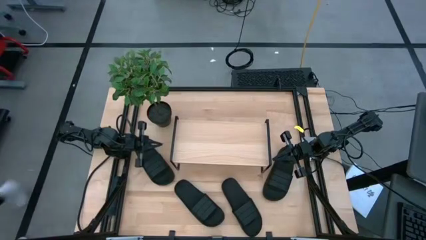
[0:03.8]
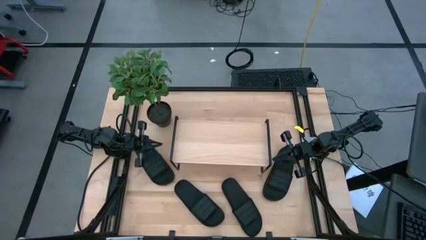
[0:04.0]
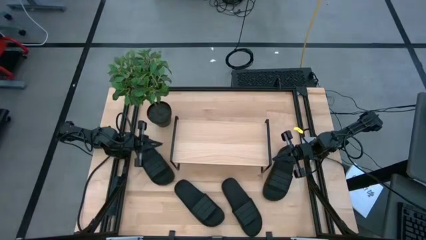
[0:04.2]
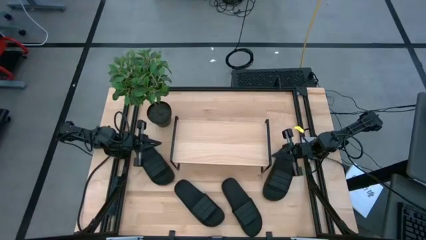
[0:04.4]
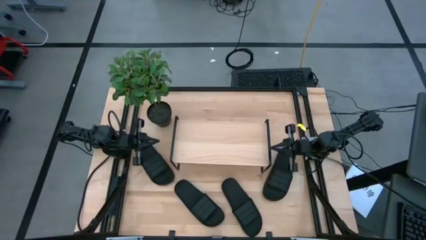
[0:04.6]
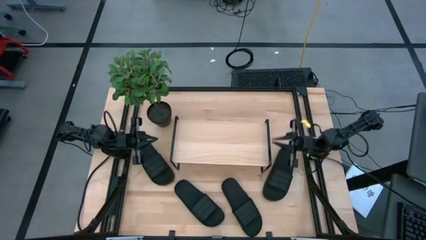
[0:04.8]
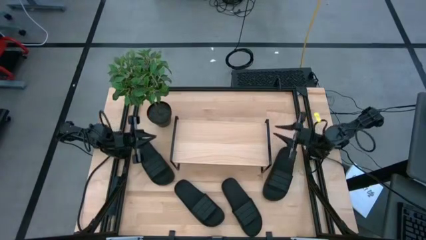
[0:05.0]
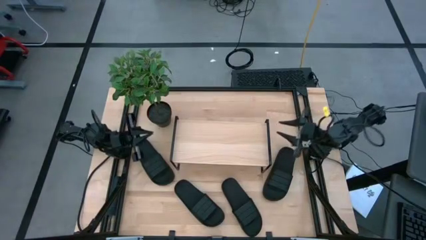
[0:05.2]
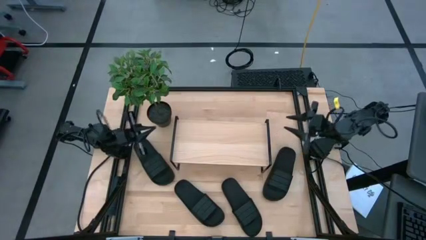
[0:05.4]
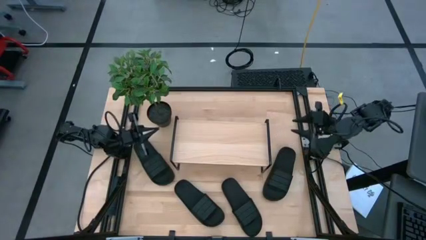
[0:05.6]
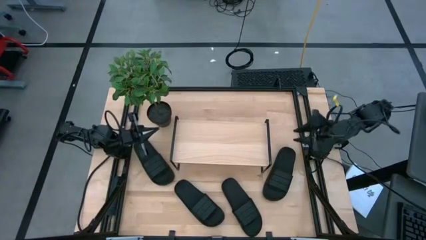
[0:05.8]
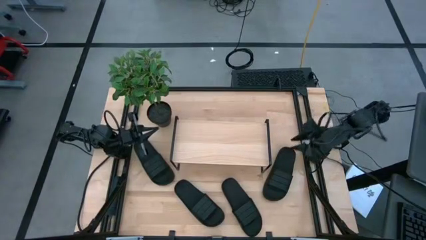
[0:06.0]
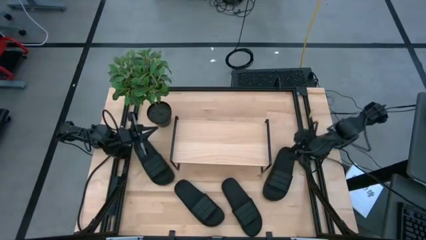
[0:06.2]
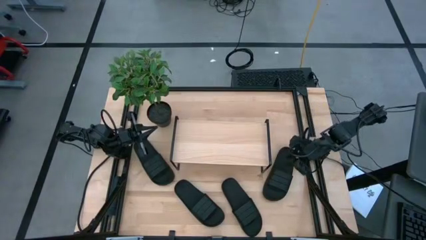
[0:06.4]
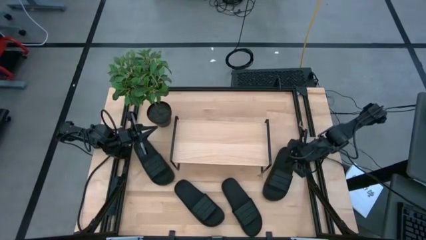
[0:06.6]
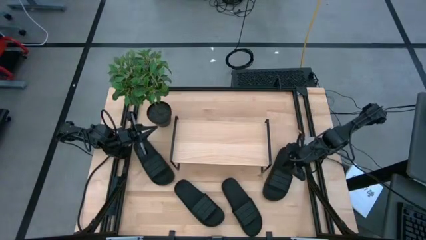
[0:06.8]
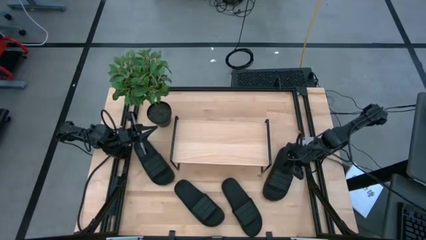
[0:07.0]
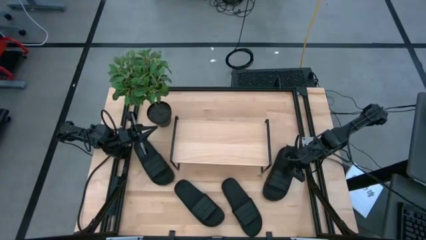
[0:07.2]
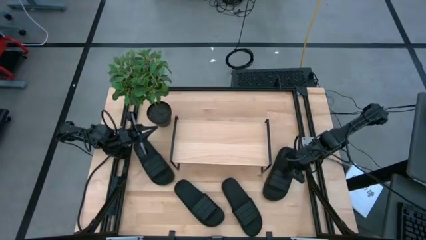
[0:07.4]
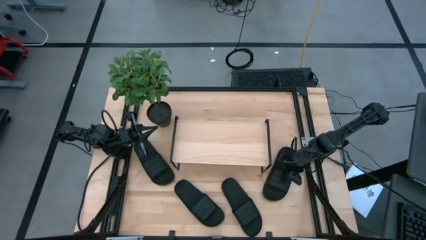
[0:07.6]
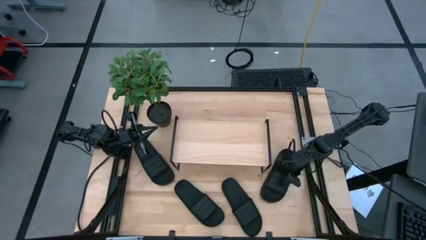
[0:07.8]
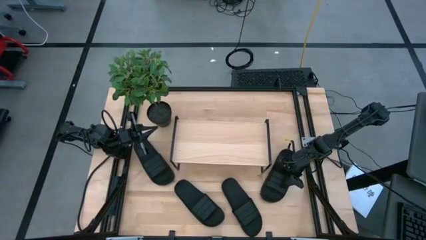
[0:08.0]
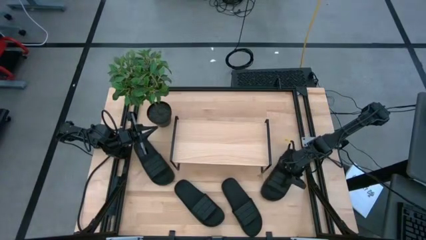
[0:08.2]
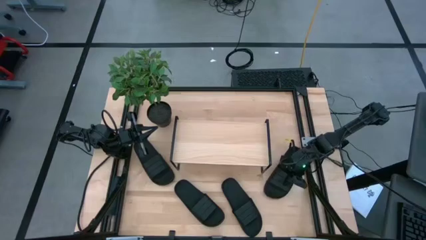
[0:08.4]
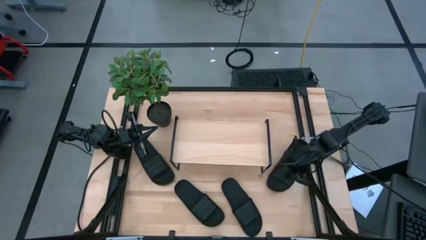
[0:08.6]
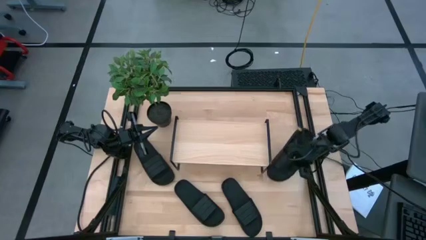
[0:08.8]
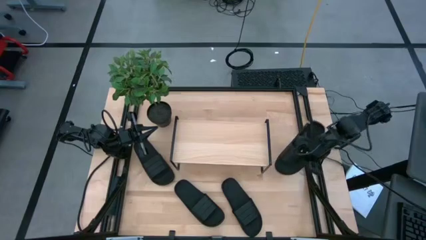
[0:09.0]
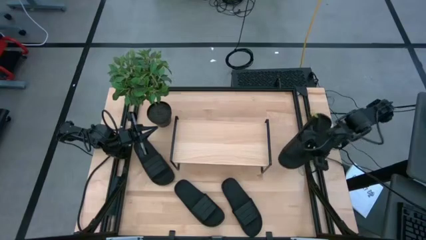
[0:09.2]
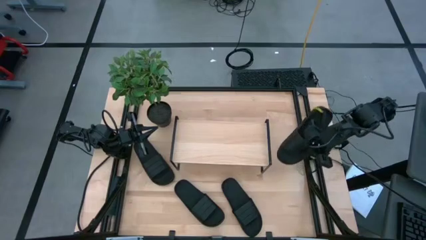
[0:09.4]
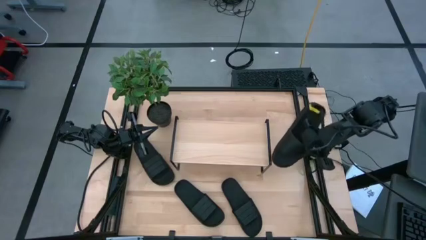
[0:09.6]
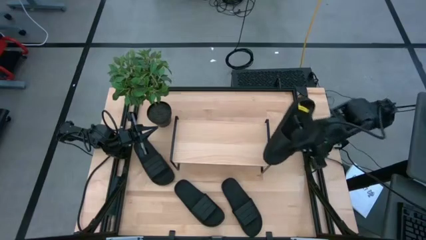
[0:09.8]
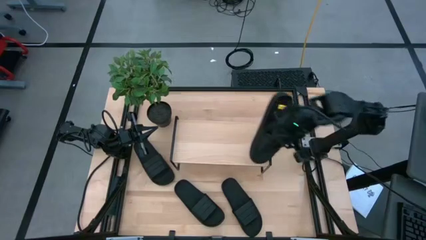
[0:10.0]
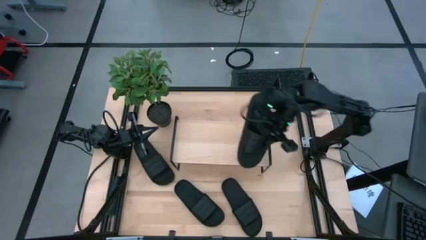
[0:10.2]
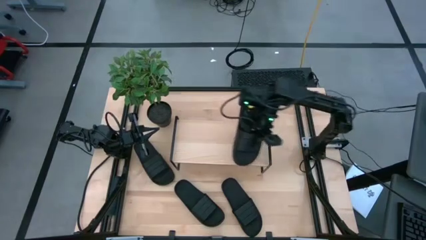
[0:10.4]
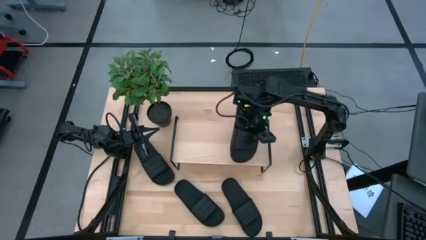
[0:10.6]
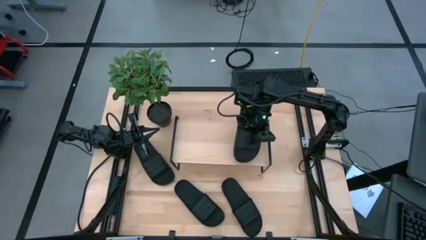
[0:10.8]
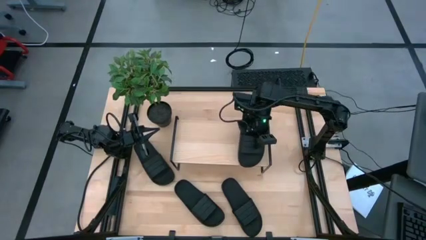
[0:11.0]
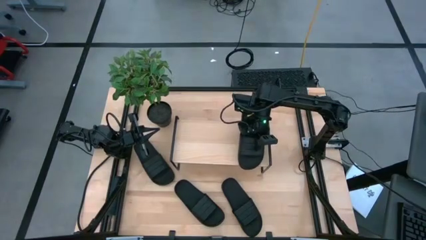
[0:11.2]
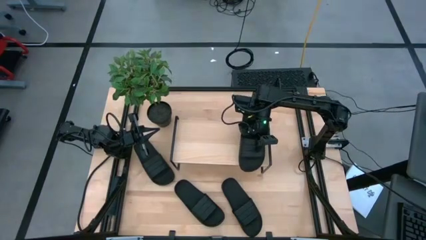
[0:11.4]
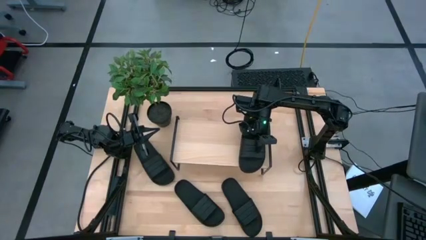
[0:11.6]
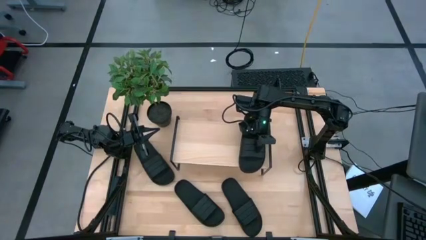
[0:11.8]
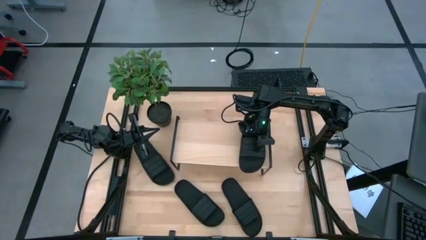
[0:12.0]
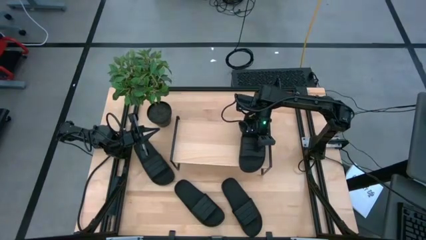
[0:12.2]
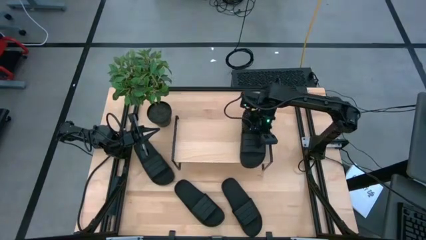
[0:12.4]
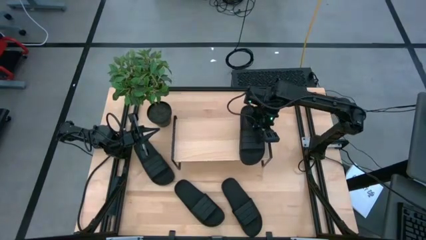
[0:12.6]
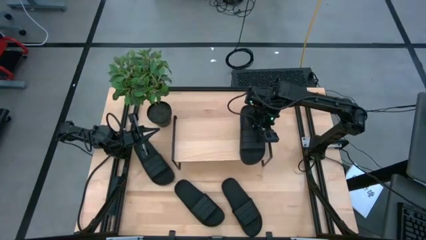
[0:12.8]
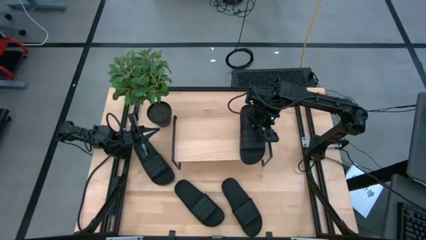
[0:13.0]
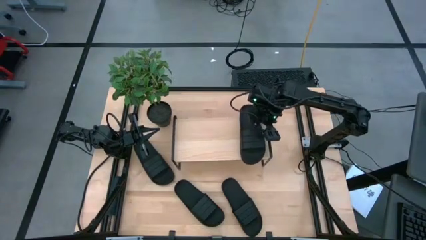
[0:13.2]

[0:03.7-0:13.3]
Task: Pick and place slides into the shelf
Put the black slipper on the shelf

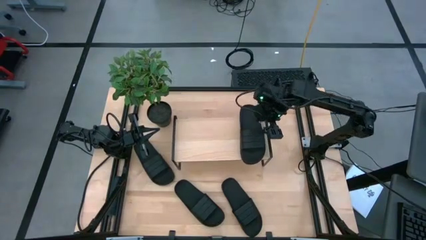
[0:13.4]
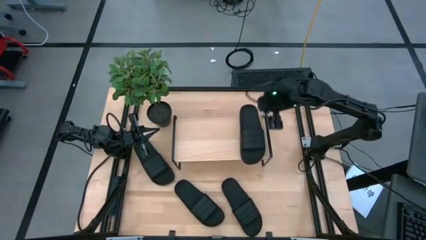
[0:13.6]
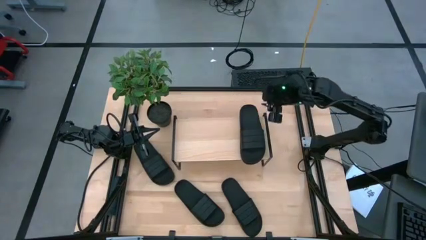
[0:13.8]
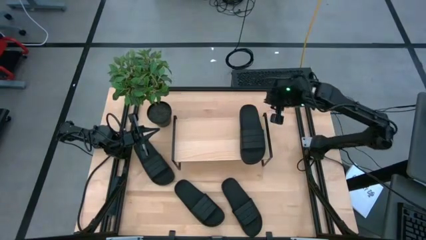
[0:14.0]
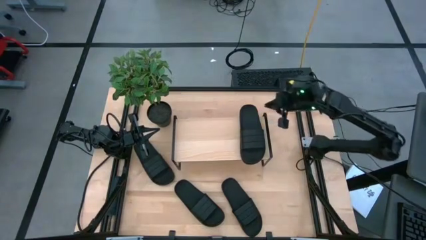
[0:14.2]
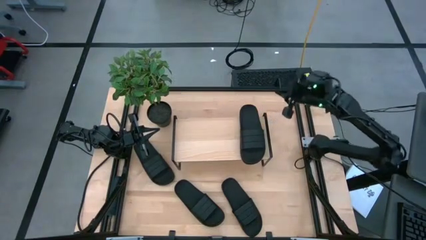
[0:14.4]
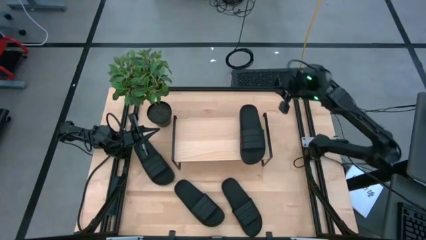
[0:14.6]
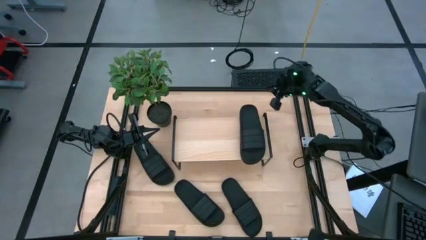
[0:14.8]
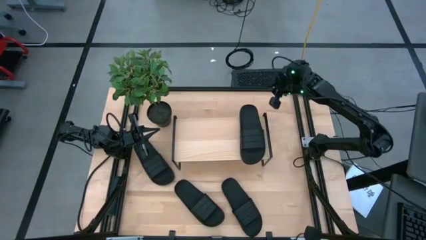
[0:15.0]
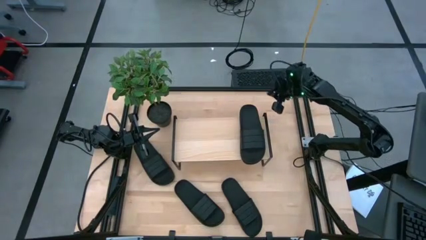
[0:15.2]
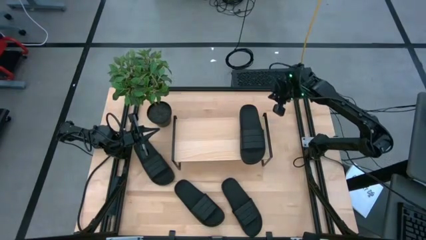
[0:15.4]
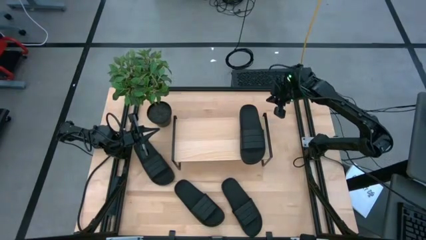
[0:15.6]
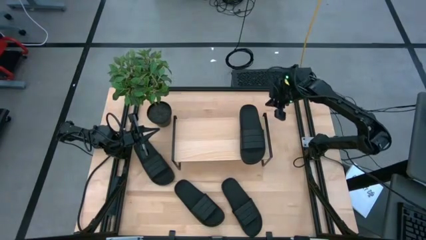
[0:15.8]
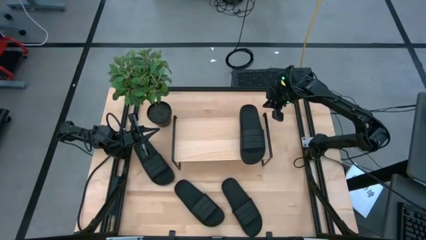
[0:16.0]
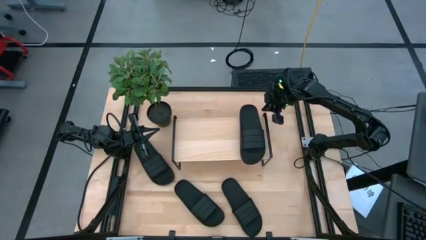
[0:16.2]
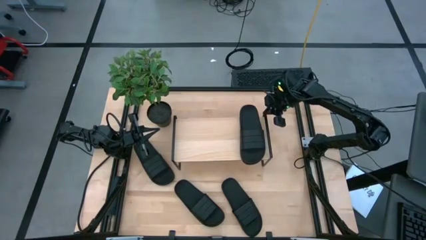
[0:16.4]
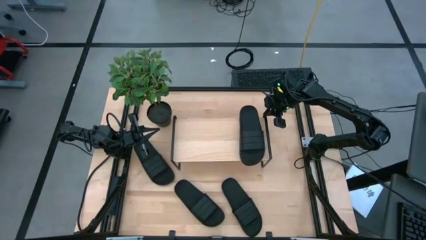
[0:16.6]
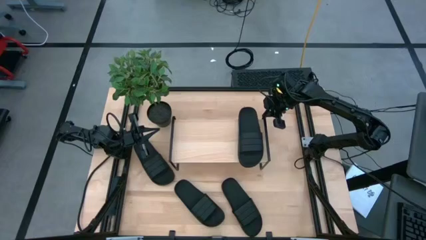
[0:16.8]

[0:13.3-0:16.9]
Adjust the shelf

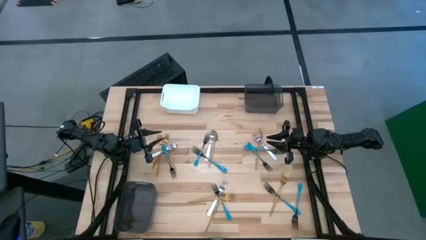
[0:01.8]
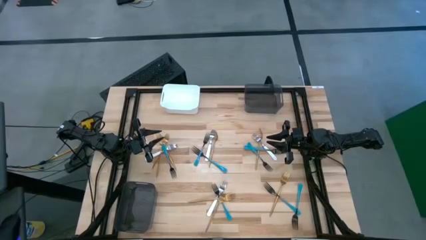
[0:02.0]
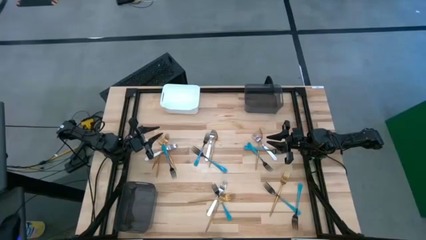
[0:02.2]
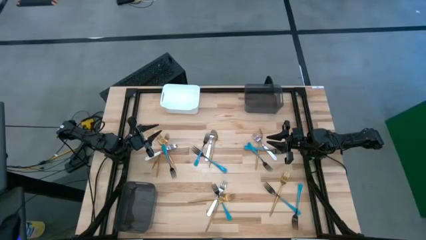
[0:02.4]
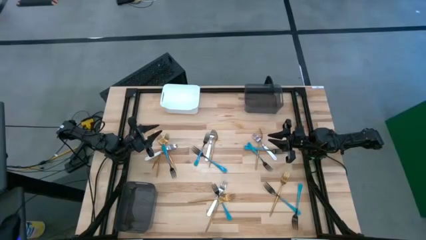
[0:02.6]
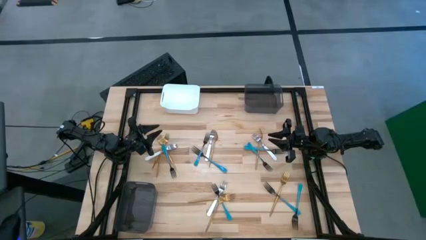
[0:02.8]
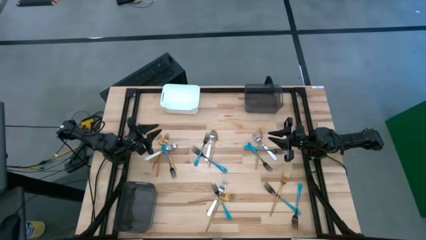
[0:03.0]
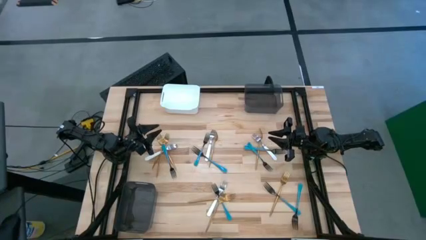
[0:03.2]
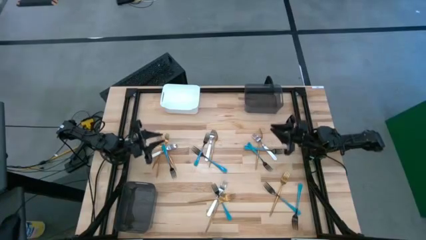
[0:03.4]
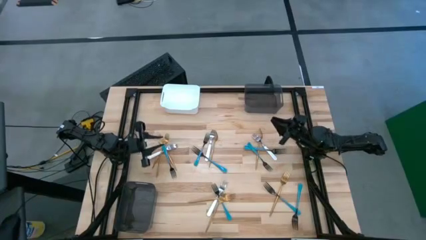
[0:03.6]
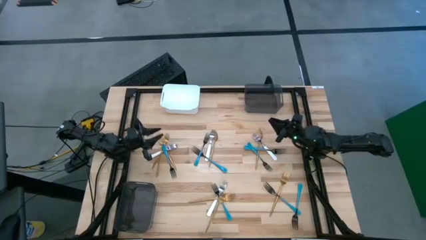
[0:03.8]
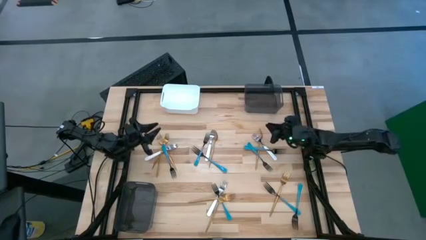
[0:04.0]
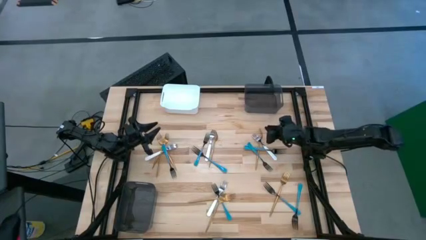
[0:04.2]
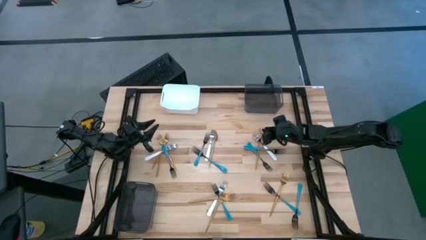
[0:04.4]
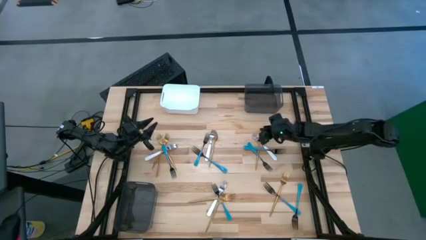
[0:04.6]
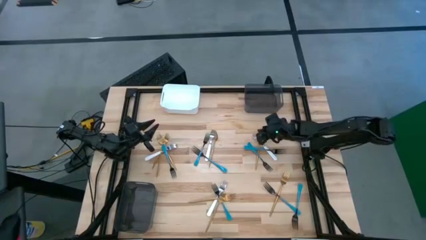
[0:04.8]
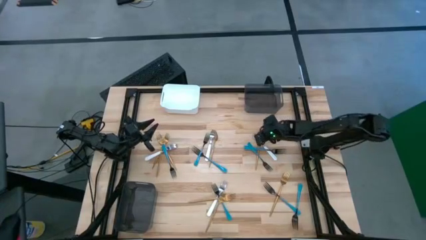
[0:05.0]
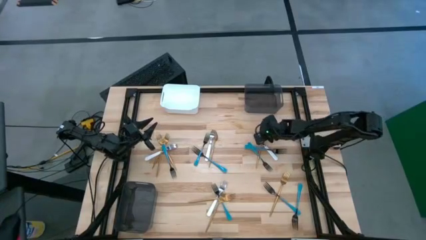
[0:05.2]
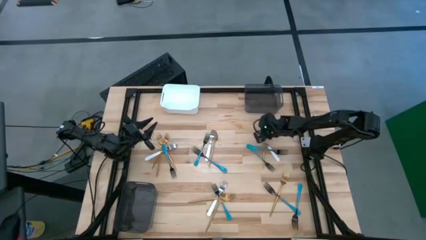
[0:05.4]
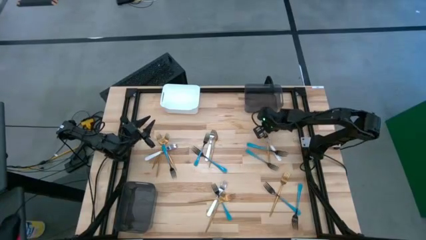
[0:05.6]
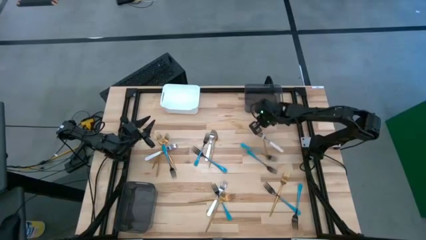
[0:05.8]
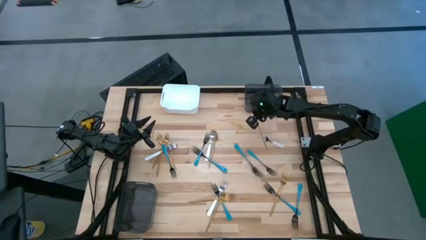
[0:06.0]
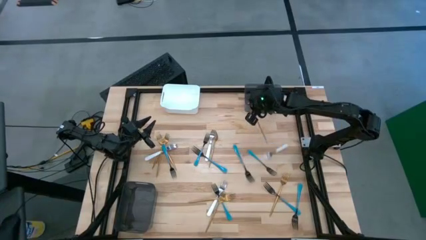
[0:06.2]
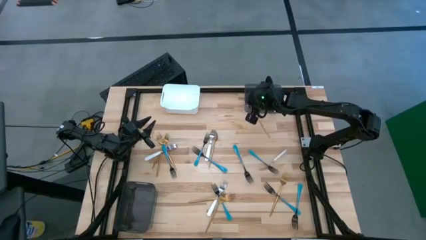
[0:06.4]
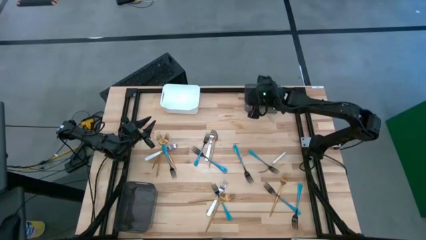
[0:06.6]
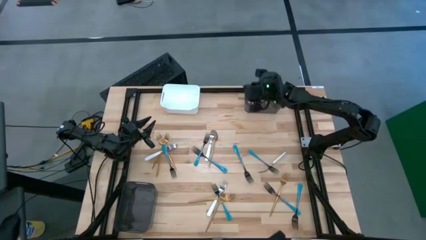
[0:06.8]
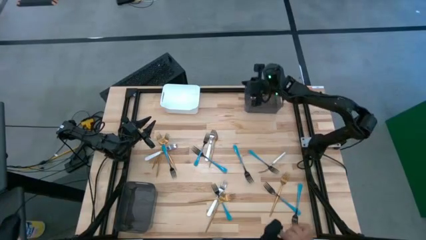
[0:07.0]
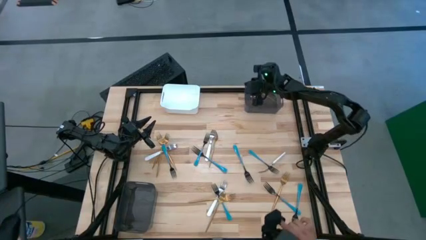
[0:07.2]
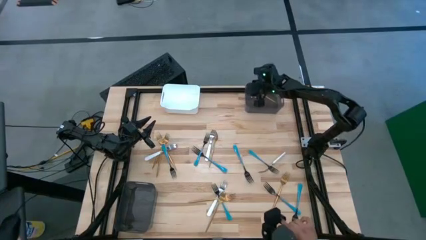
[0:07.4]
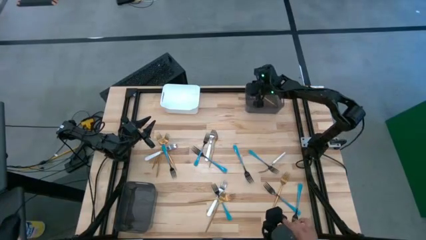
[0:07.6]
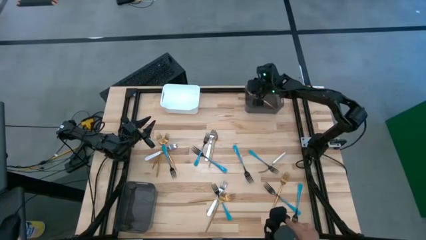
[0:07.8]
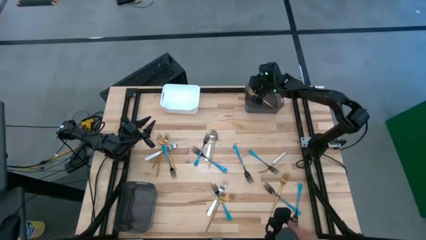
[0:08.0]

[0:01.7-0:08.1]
Task: Sort silverware by color (type)
Put the gold fork into the top black bin
